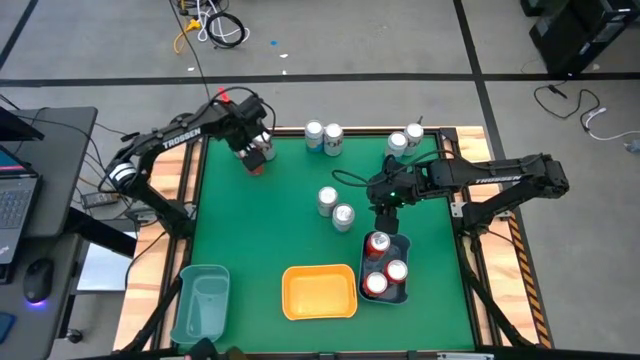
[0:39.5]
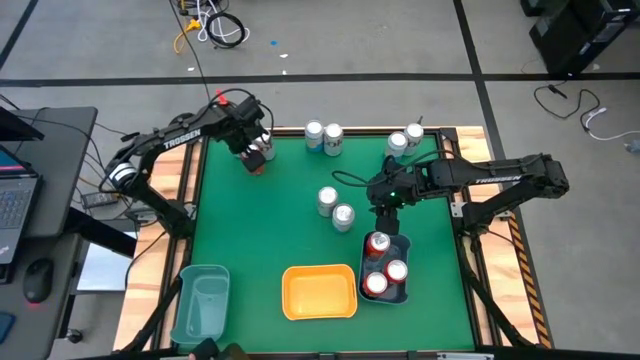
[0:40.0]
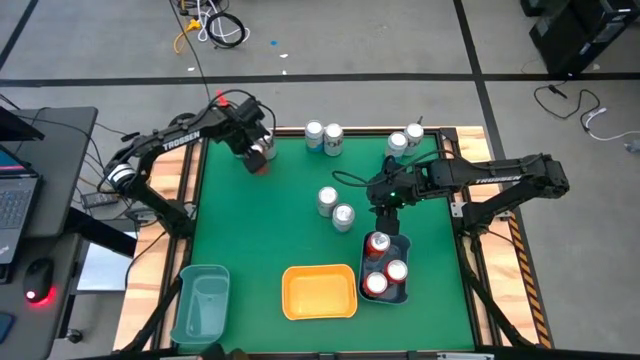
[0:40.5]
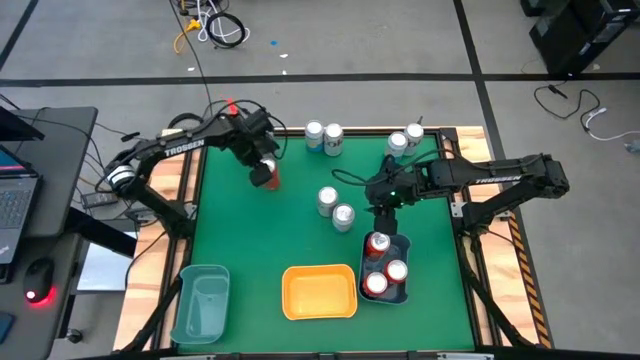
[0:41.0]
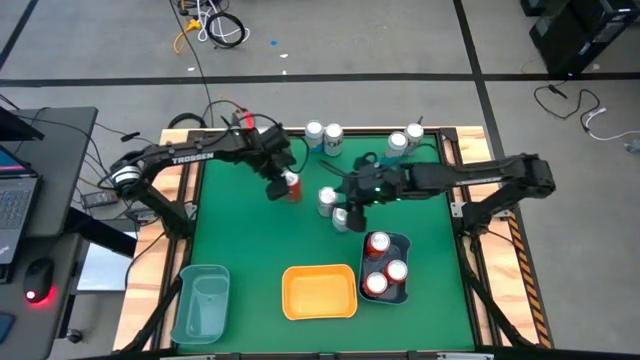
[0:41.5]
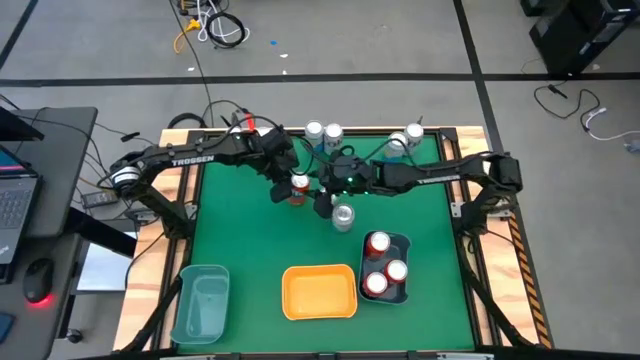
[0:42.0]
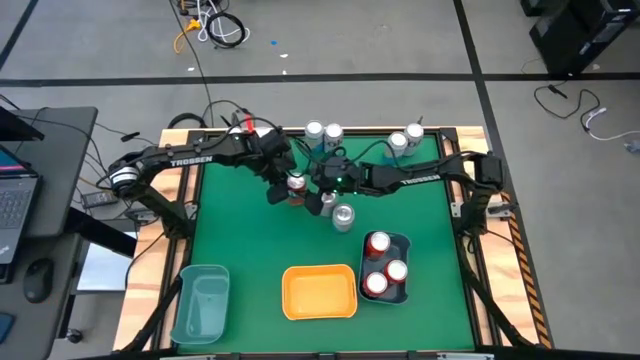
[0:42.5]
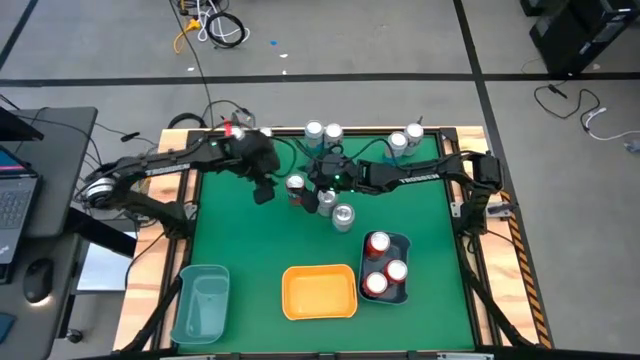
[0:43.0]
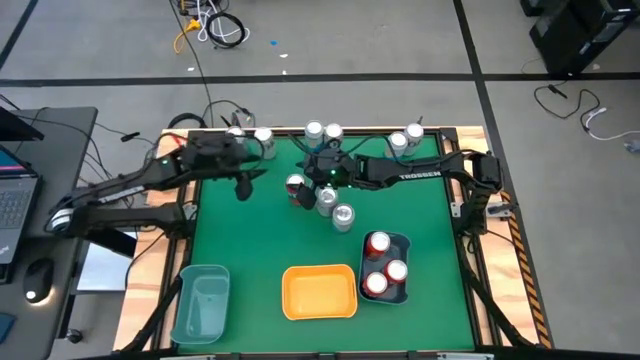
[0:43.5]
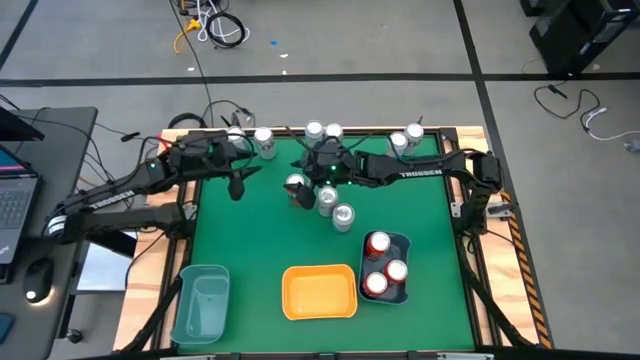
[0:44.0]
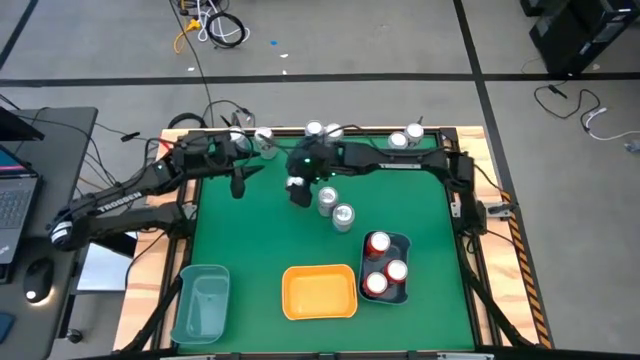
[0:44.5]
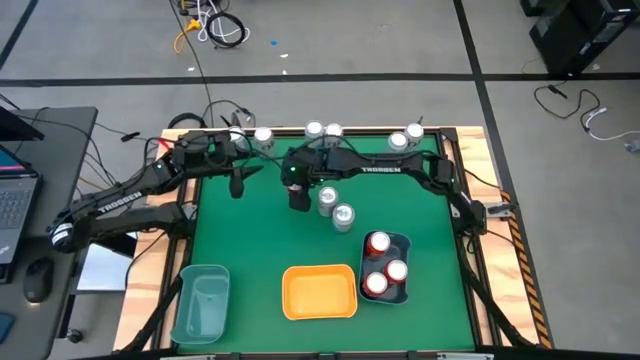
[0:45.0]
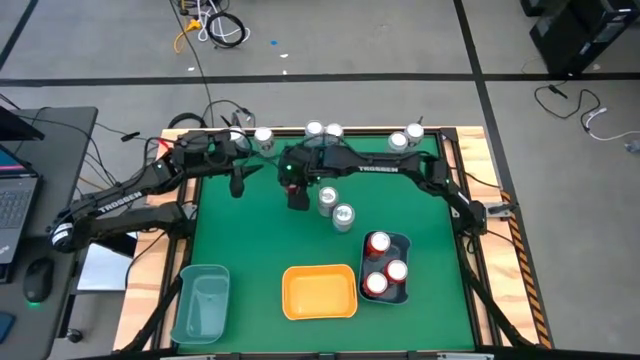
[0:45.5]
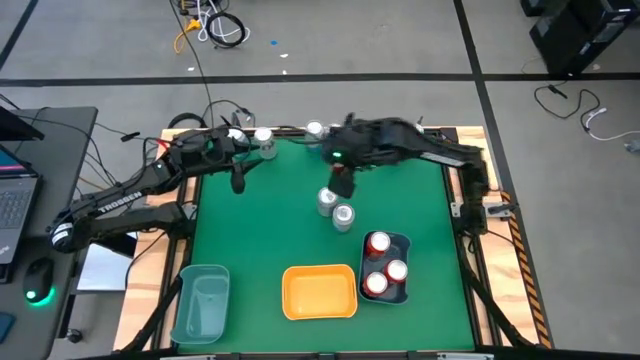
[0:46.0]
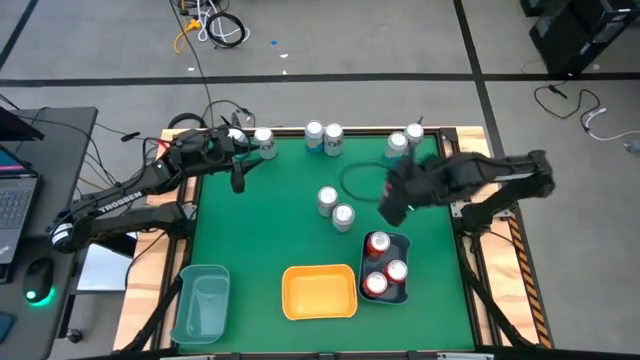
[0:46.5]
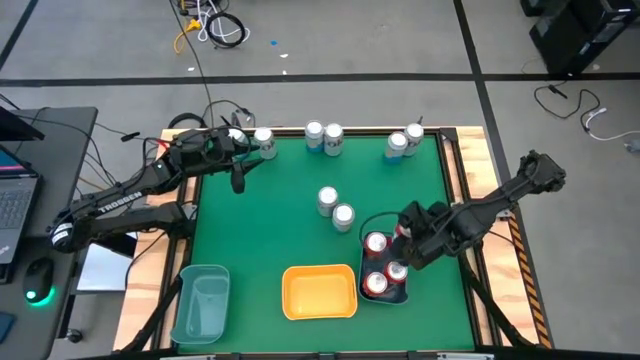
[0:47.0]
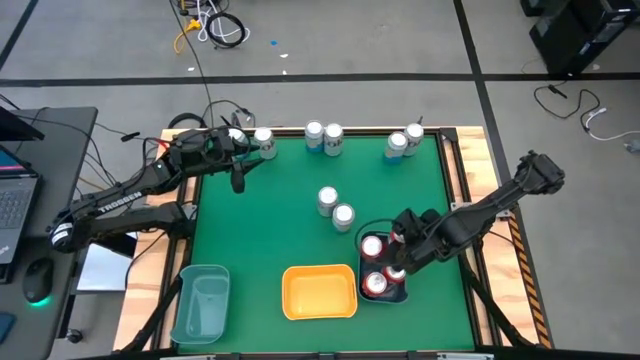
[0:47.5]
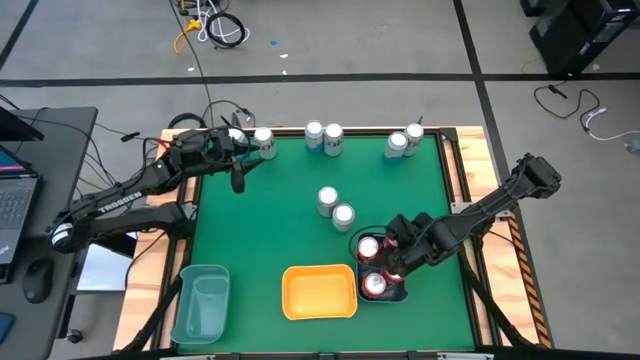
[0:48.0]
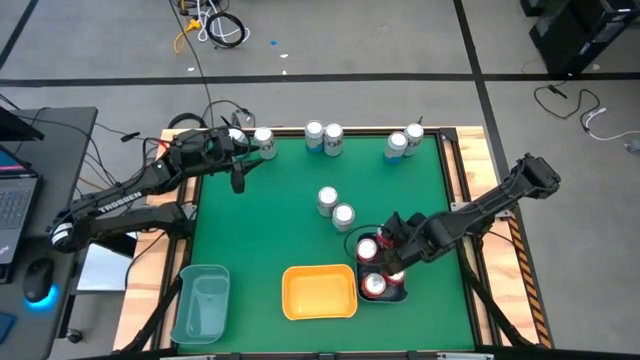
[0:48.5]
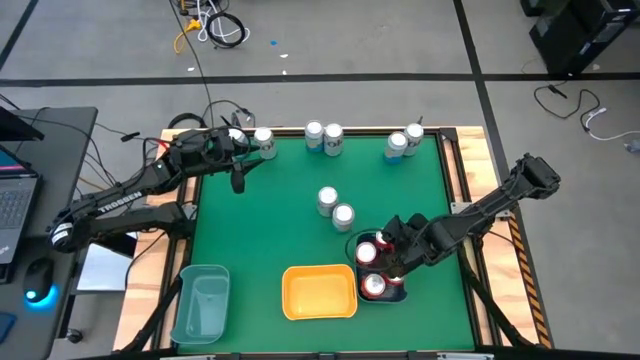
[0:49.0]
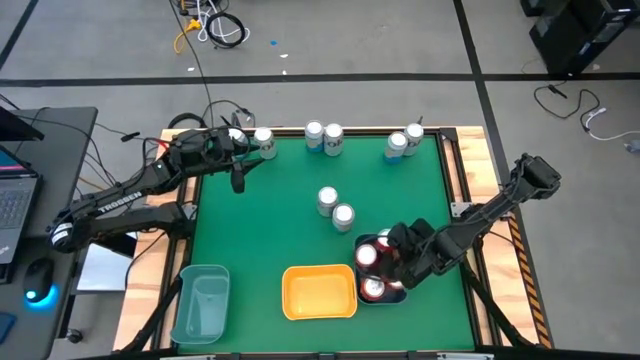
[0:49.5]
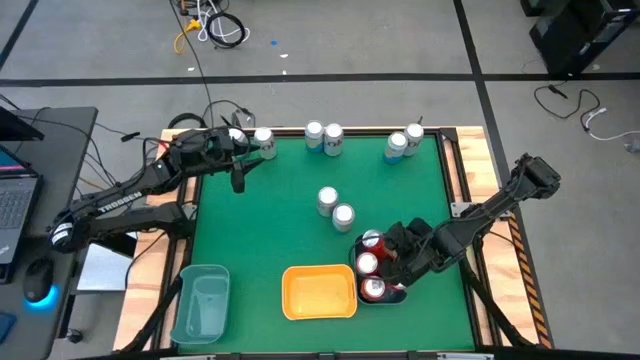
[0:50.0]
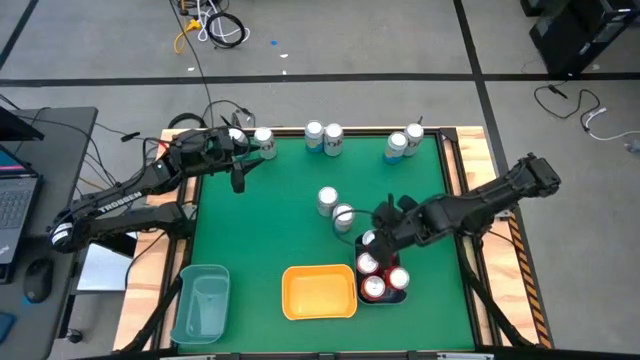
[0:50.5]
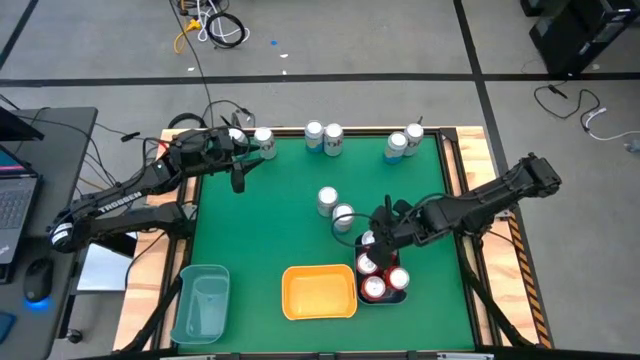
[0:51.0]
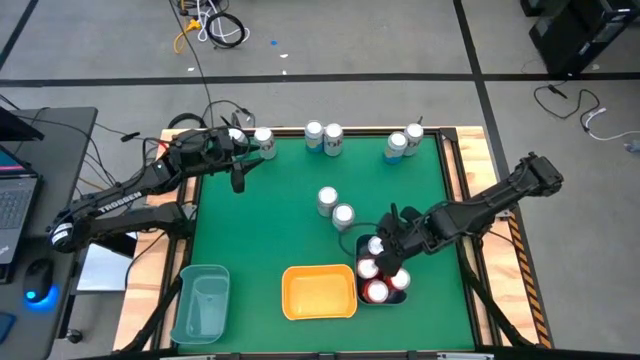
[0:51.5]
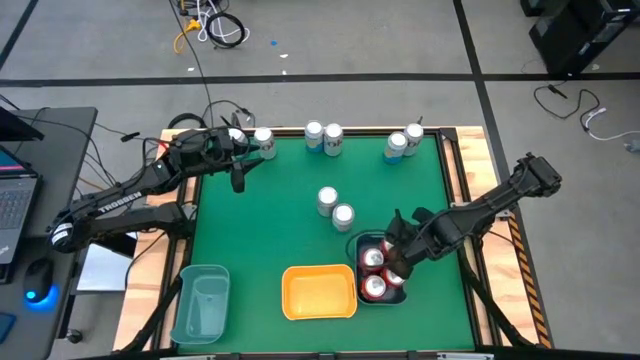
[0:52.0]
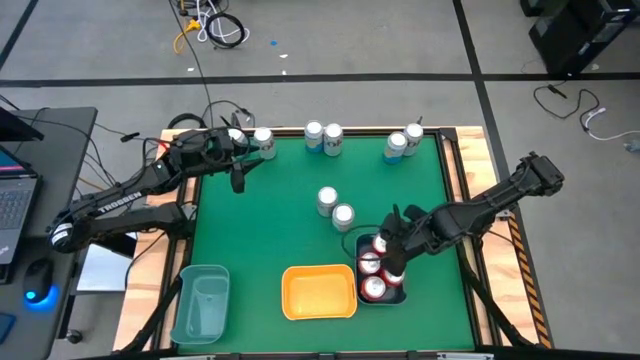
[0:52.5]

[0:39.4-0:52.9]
Task: Sort soda cans
Put the red soda can into the blue bin

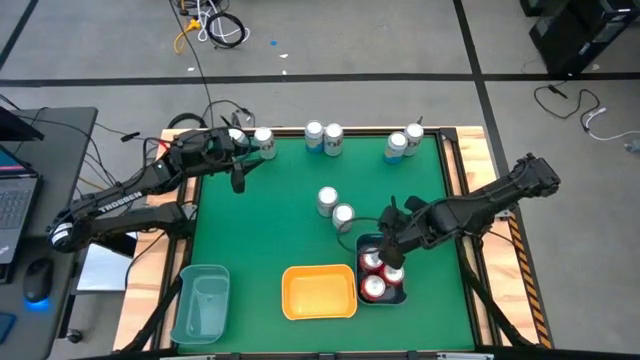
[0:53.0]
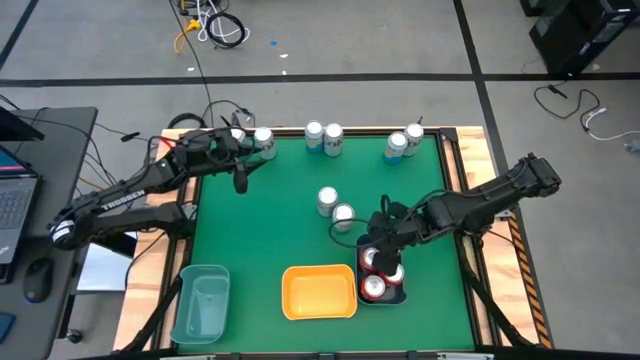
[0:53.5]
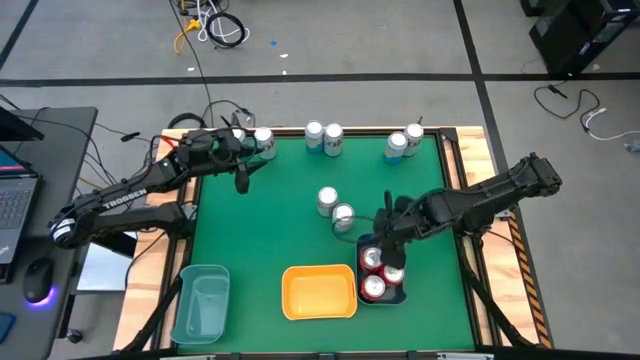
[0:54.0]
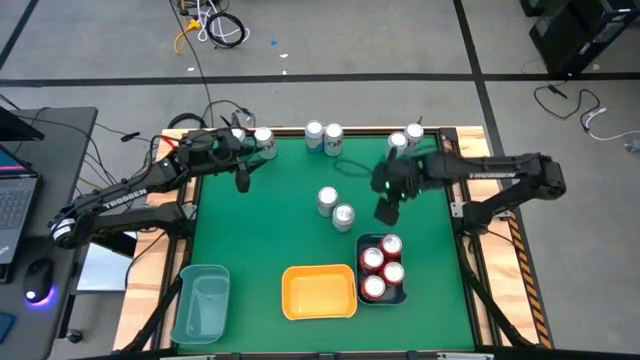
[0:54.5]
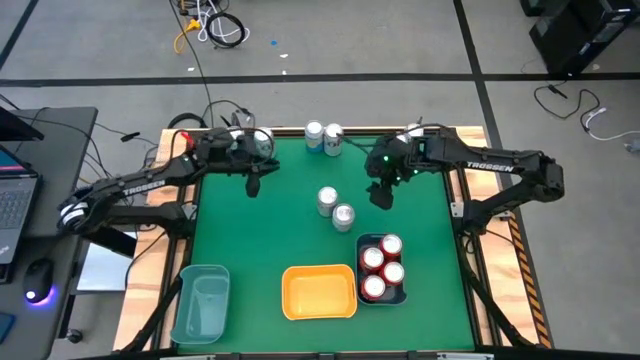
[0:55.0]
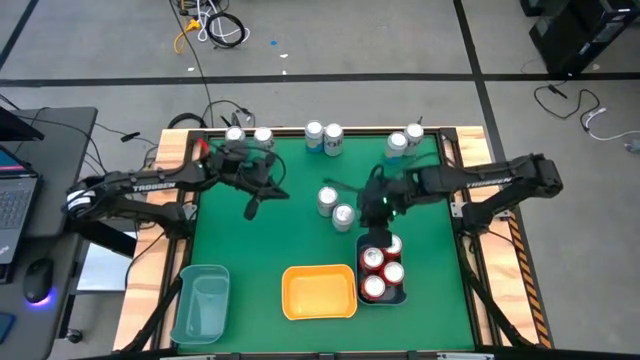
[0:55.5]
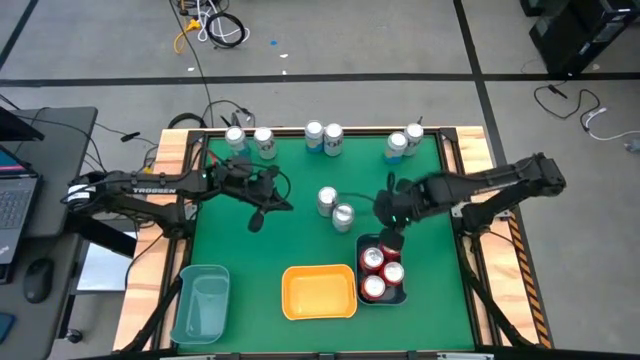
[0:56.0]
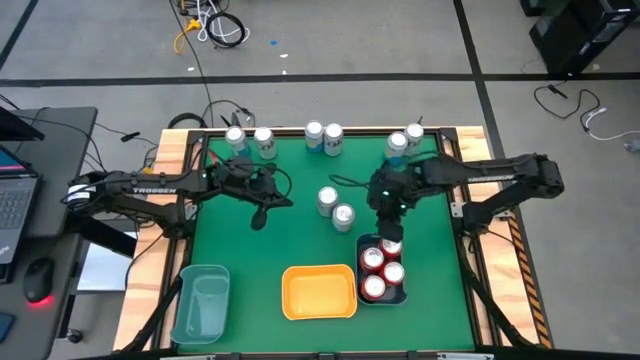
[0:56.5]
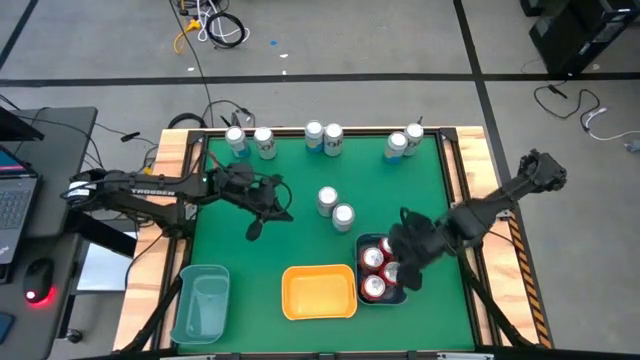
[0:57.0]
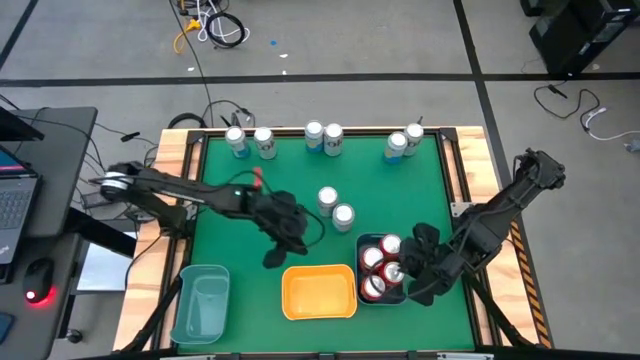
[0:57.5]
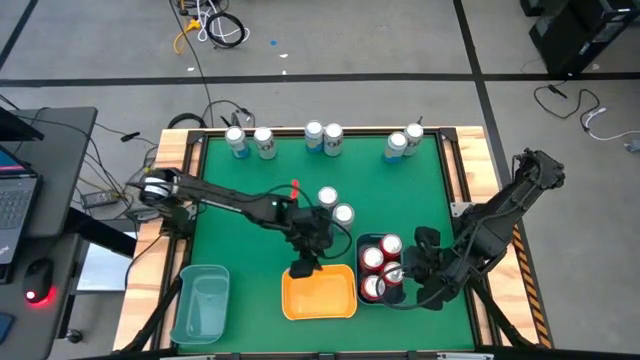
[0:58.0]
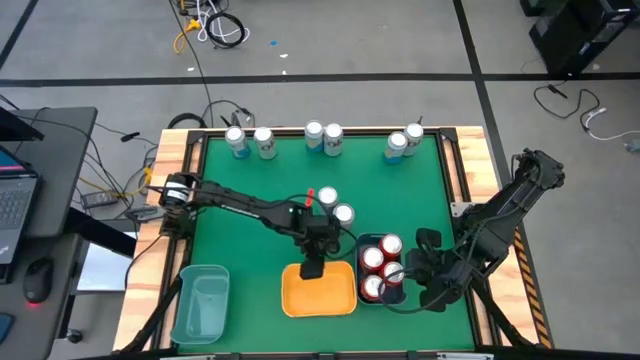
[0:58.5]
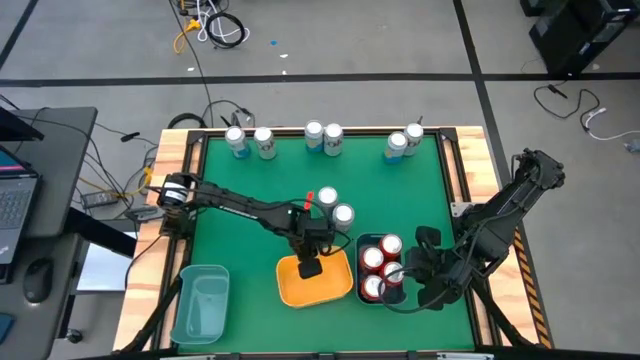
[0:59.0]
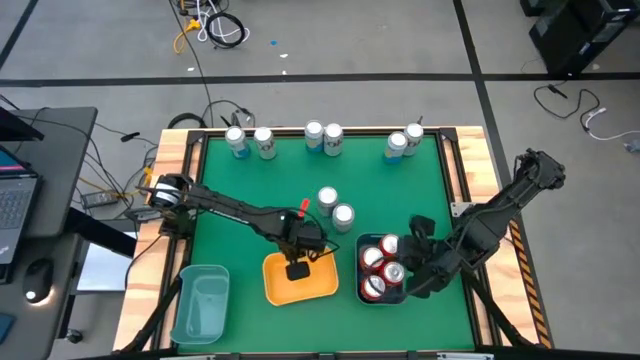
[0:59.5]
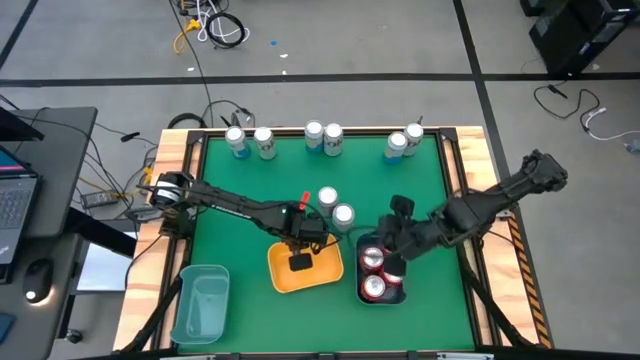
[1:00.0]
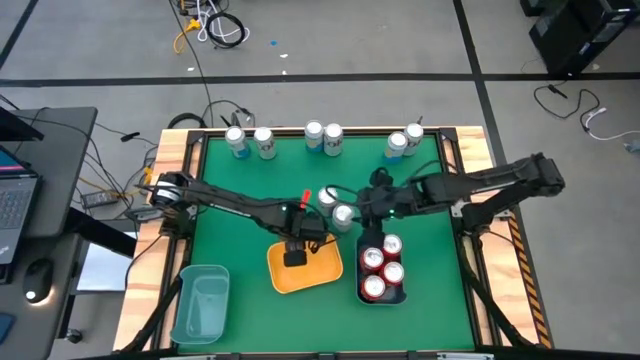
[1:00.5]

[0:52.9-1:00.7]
Adjust the yellow bin on the table
